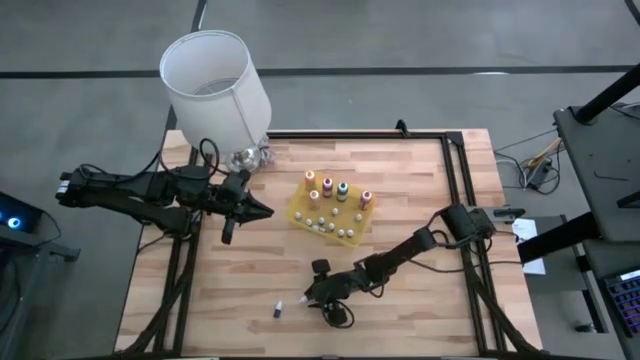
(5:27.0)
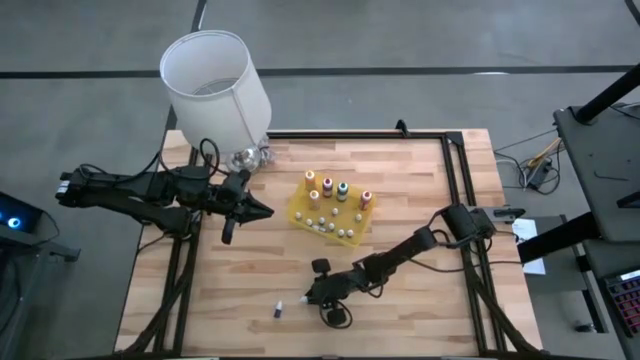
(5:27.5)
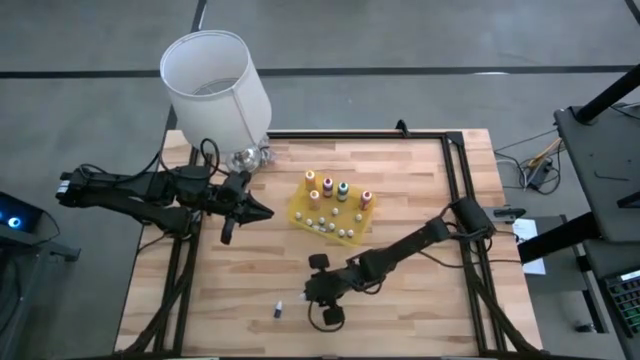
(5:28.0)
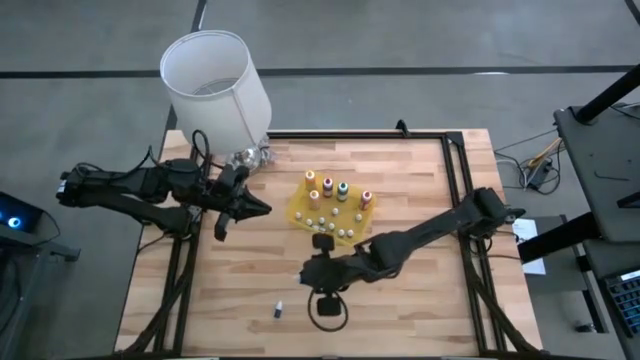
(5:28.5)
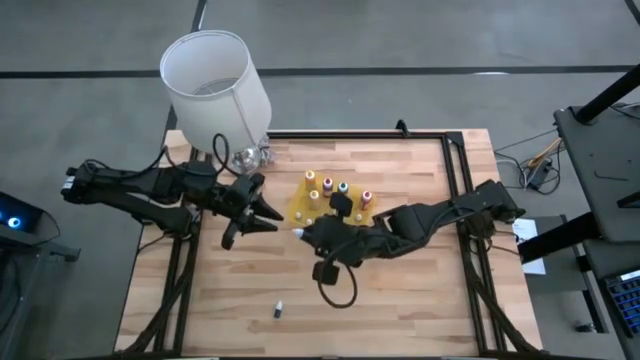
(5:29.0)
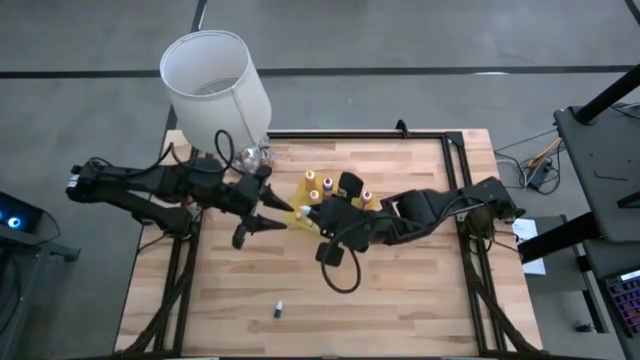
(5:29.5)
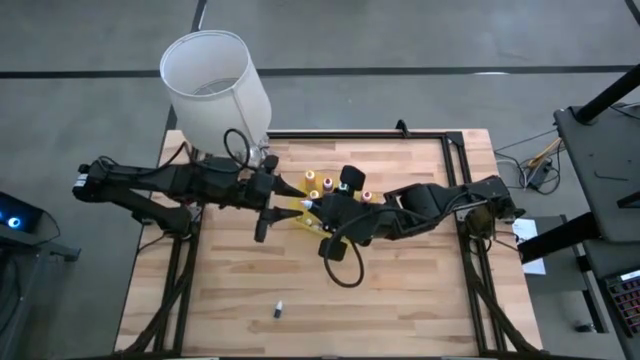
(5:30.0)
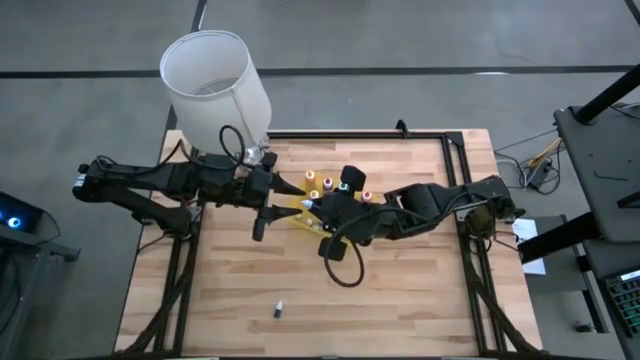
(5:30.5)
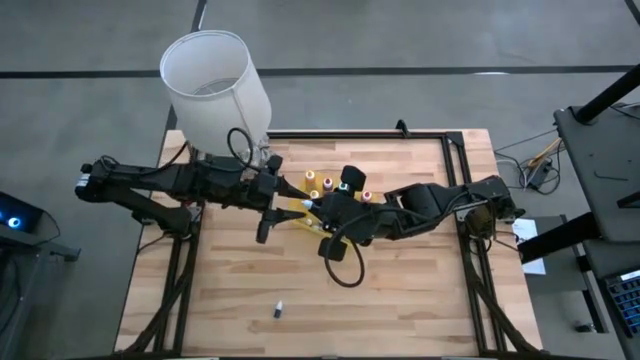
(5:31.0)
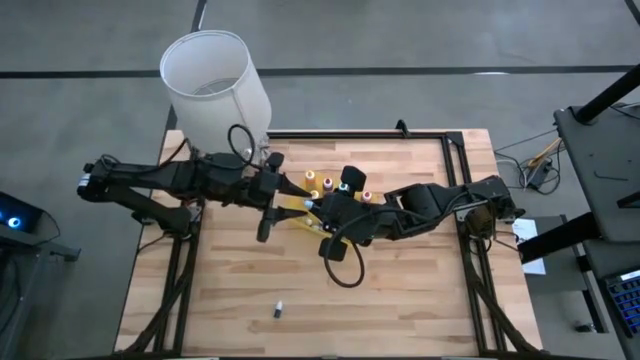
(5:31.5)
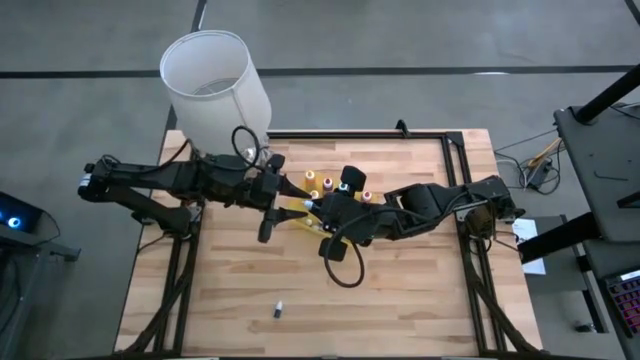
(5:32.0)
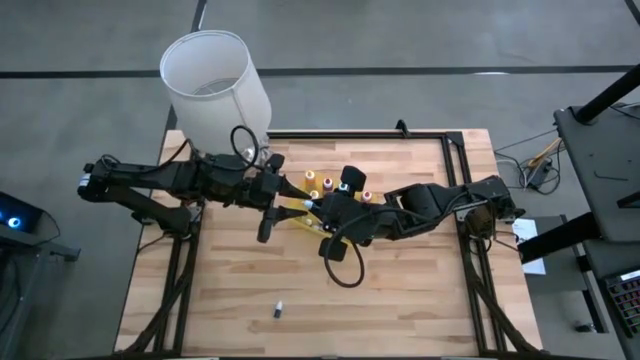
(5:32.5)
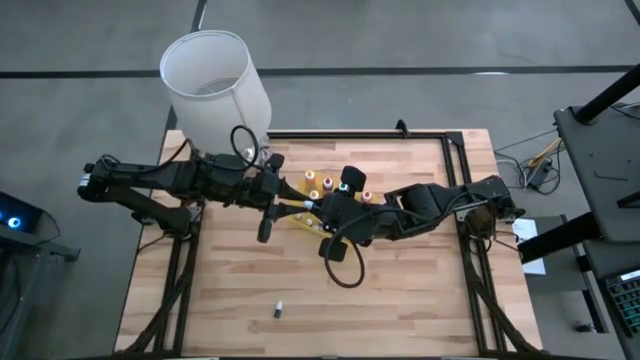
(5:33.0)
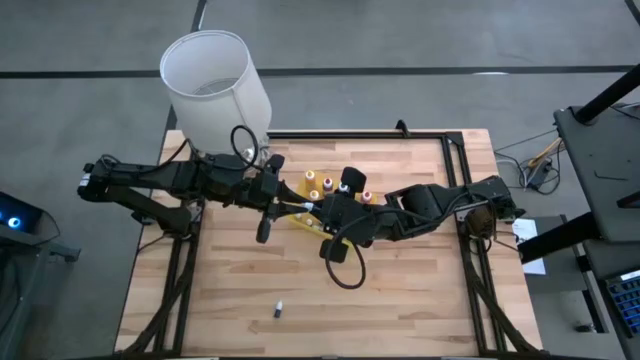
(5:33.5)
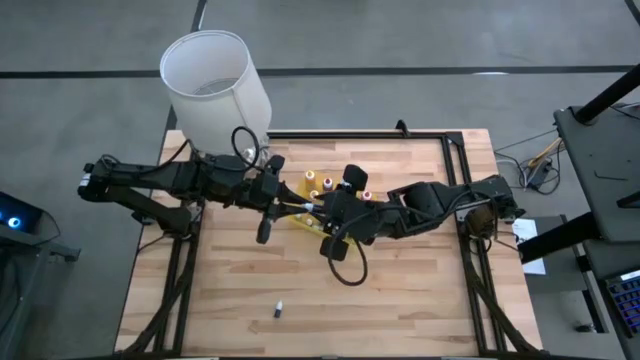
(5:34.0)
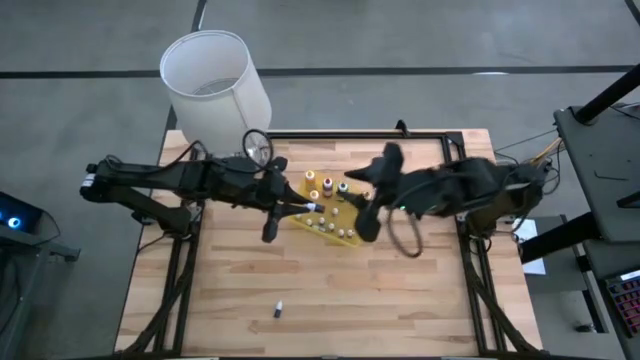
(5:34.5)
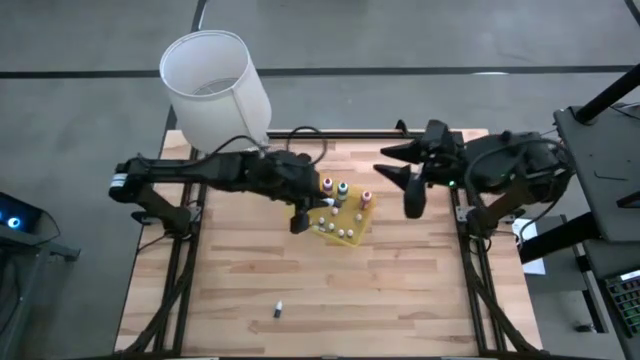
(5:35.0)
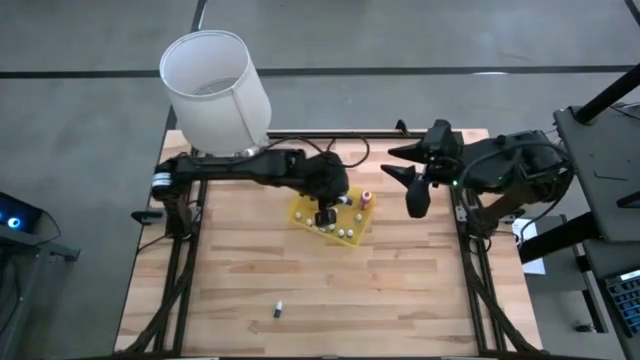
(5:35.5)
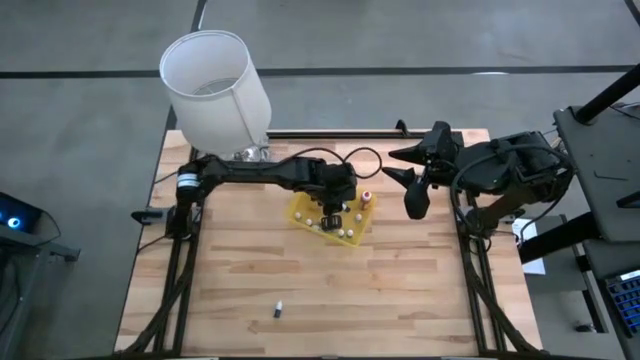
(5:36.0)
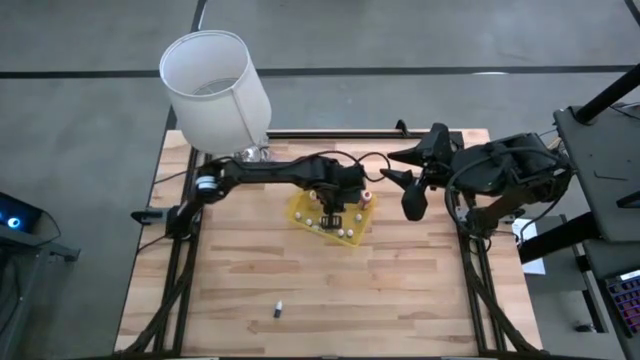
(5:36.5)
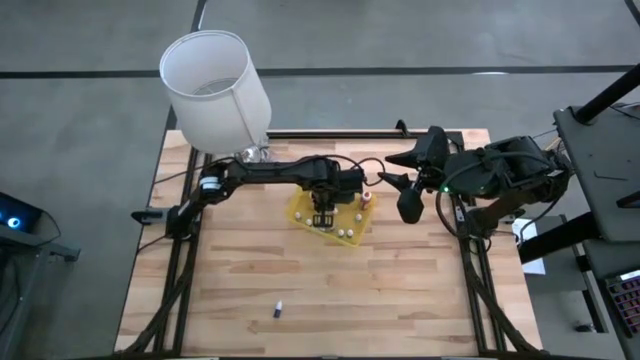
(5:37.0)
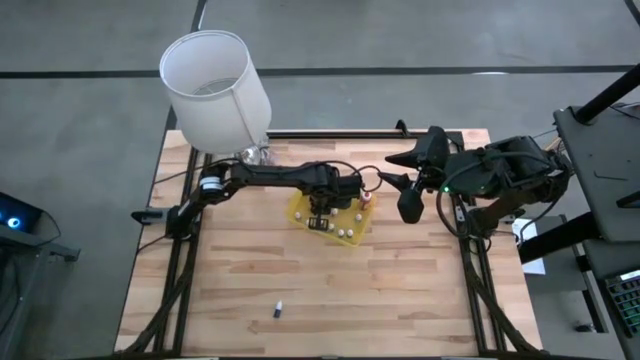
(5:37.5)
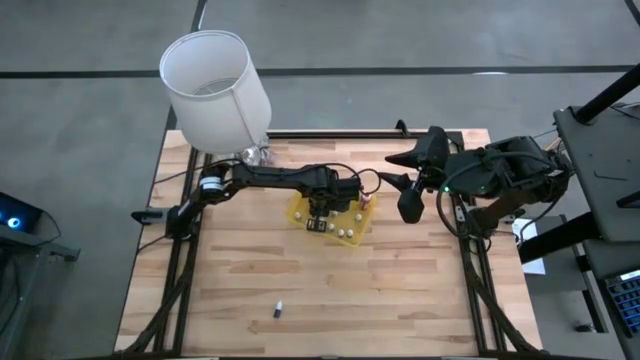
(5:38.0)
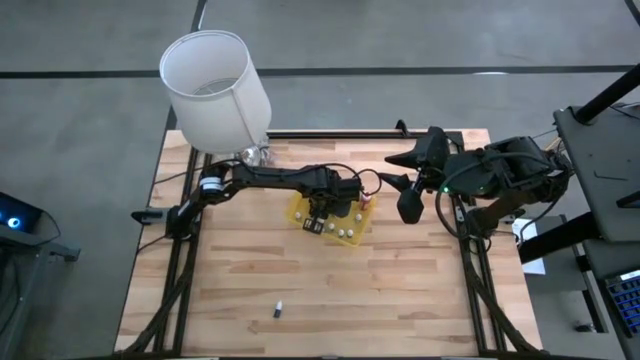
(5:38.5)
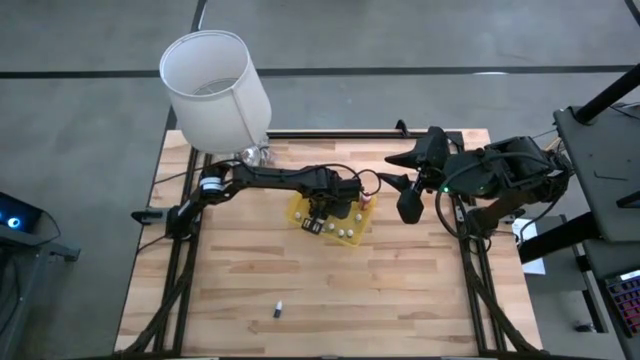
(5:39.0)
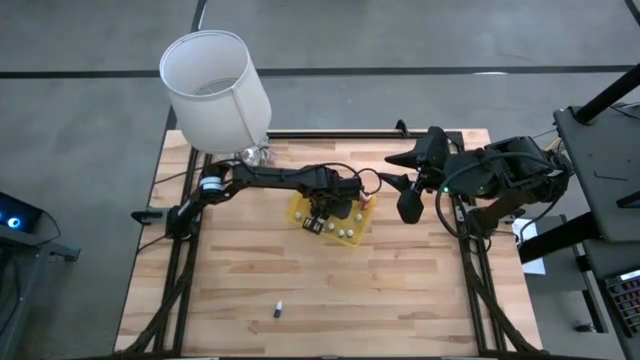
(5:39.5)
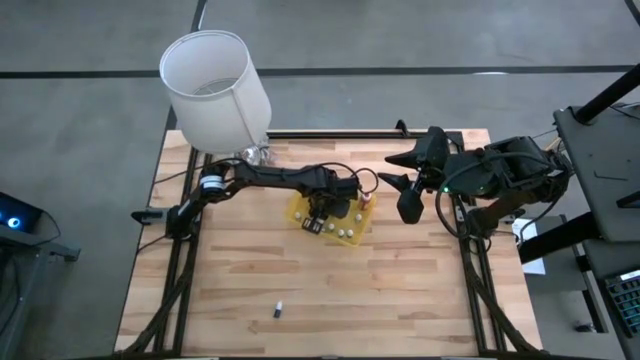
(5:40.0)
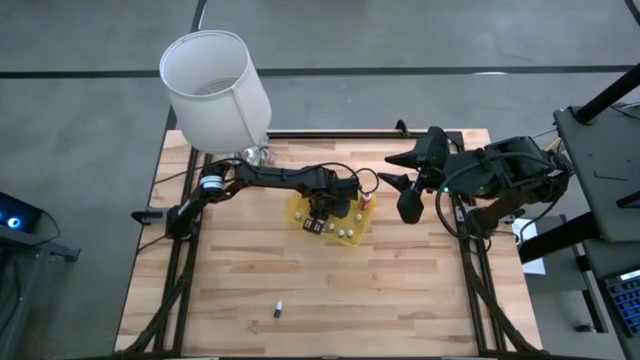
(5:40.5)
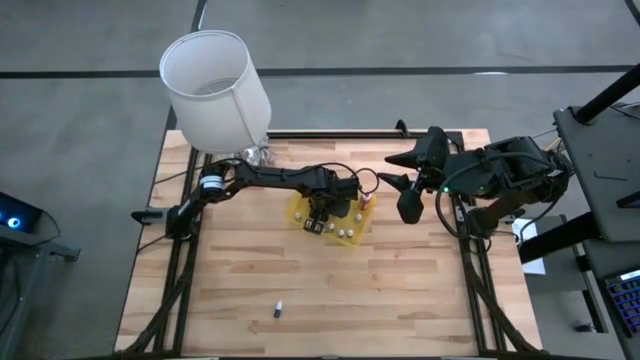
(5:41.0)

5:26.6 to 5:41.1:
Task: Pick & Place food coloring
Put the small orange food coloring bottle into the yellow bin

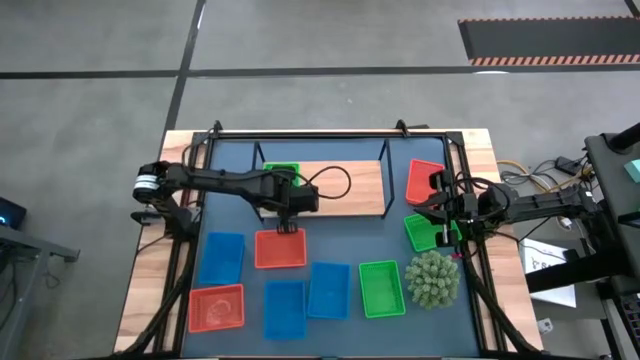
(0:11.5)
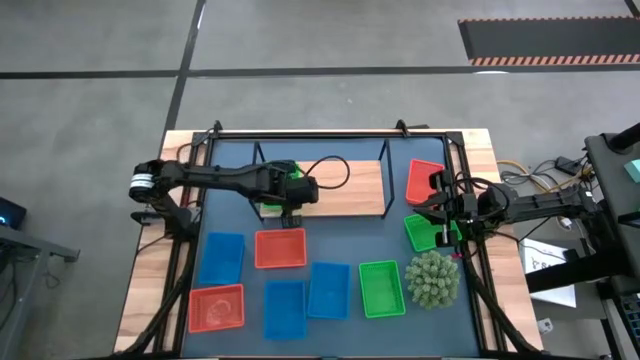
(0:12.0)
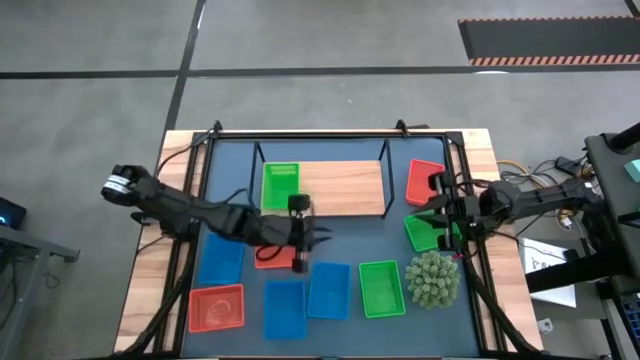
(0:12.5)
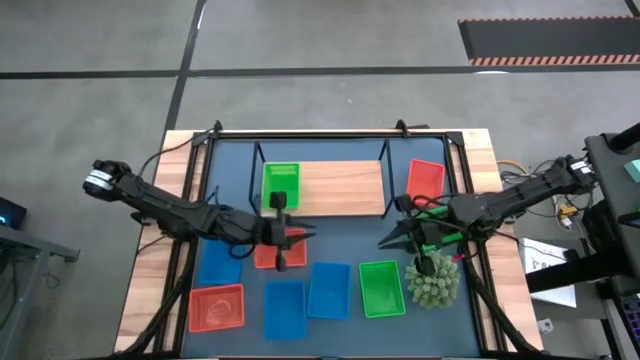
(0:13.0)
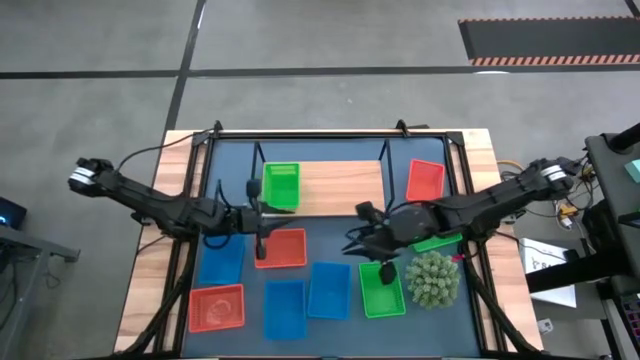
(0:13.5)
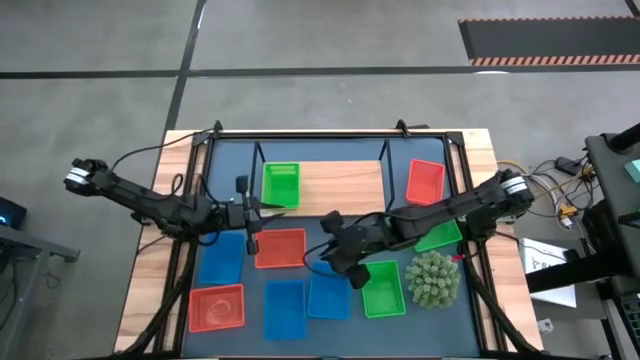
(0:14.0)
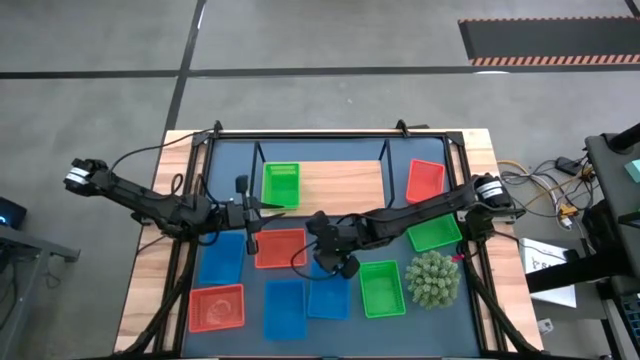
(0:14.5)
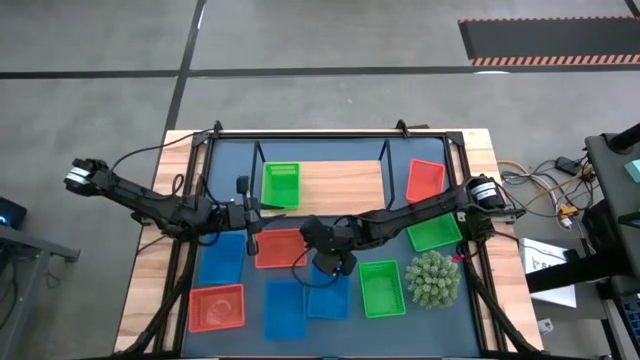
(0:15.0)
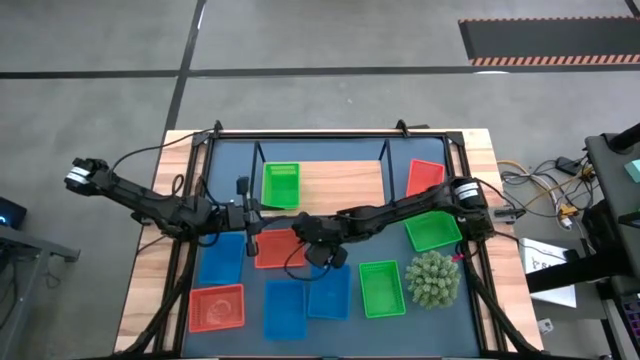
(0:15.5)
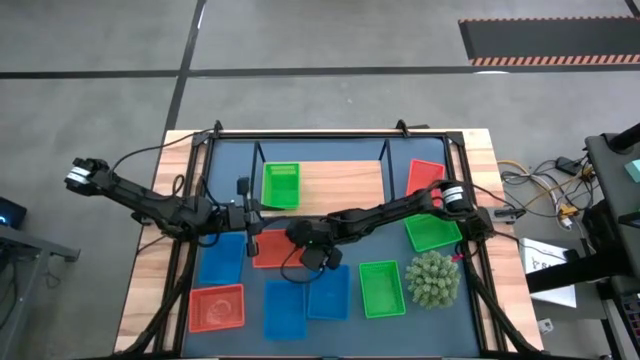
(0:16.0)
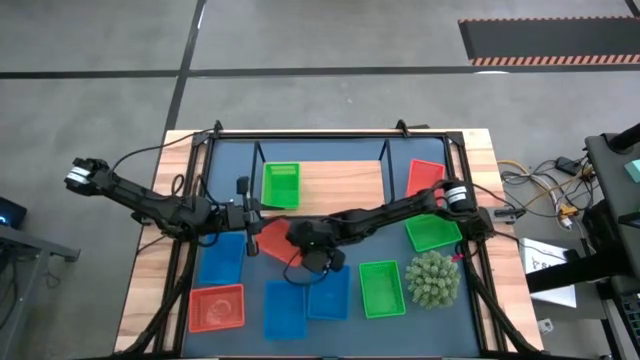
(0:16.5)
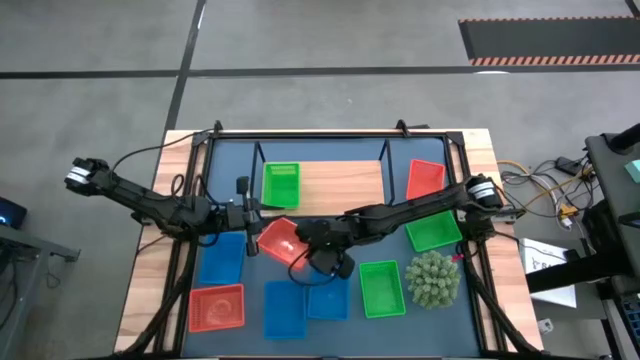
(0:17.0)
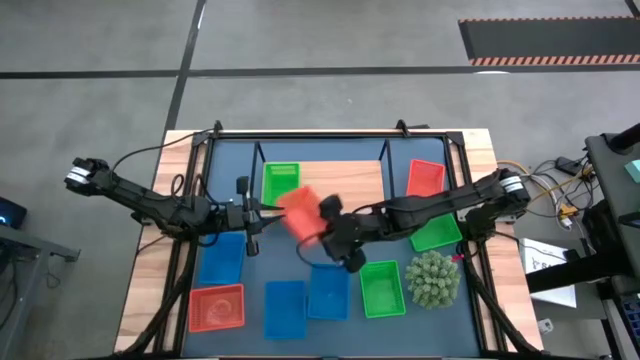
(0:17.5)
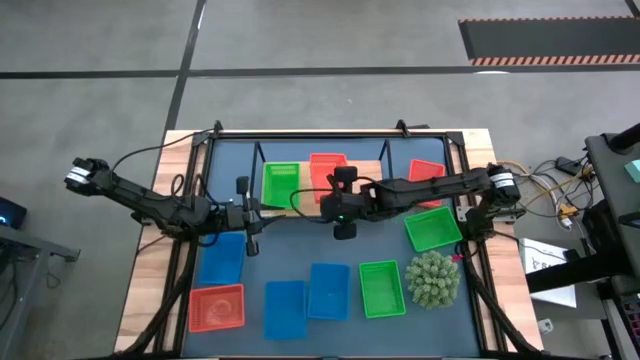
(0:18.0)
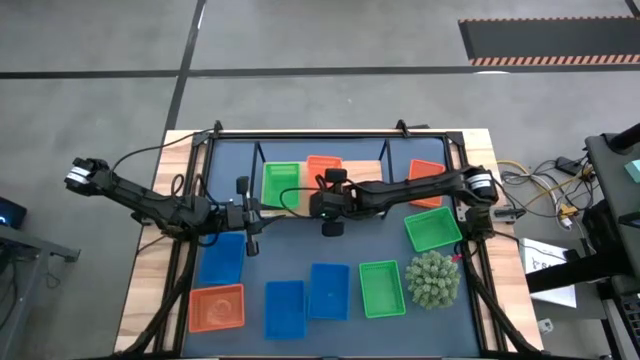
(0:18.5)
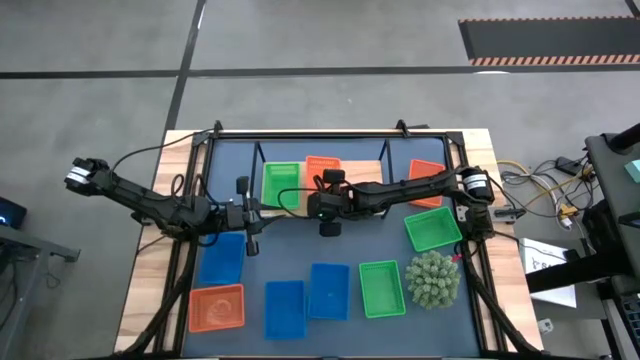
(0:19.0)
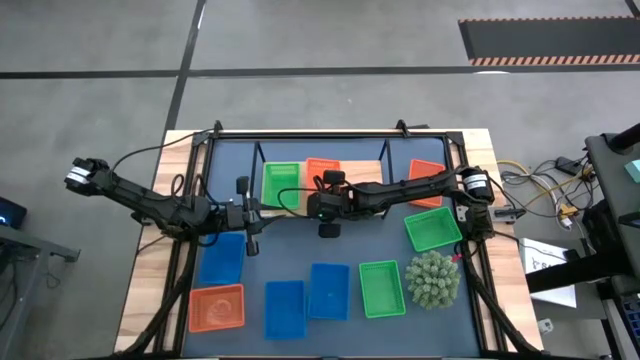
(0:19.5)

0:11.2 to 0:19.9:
Task: Stack baskets on shelf by color
Put the middle orange basket on the shelf
